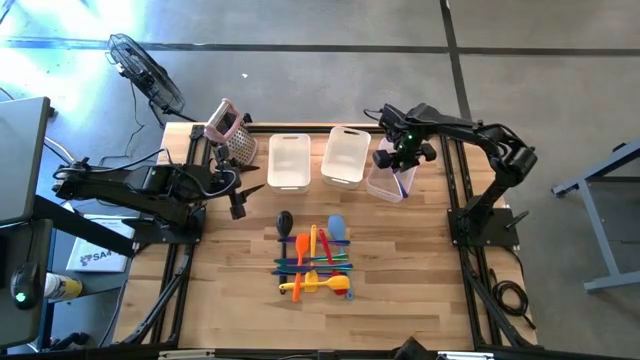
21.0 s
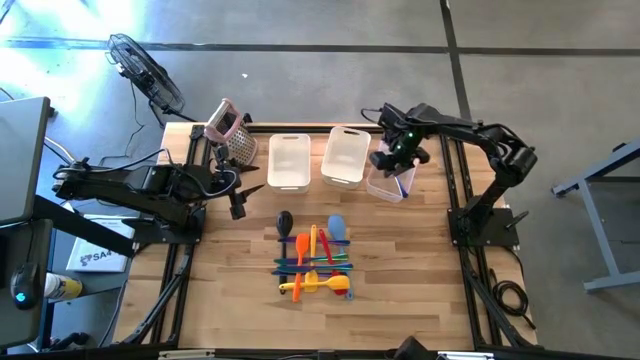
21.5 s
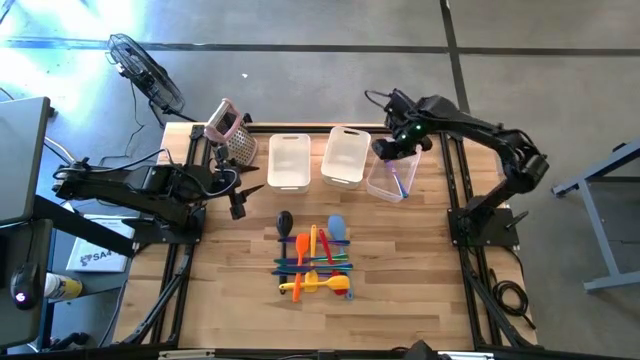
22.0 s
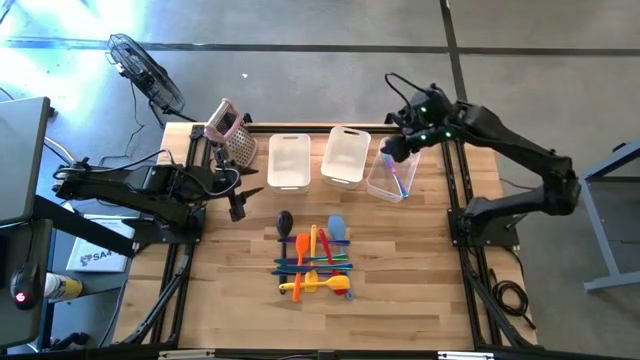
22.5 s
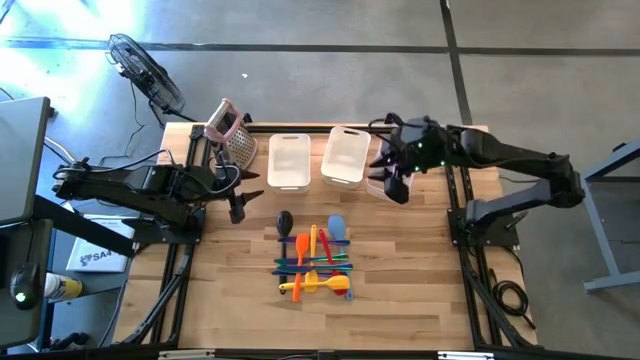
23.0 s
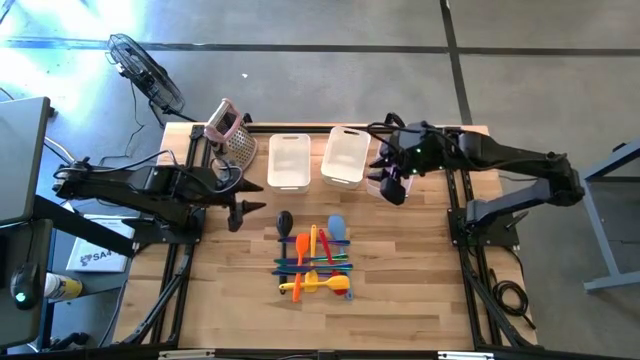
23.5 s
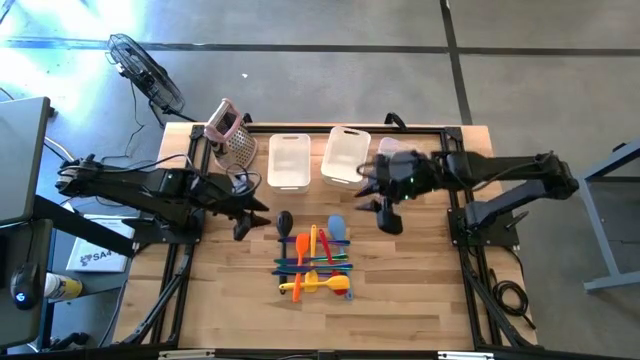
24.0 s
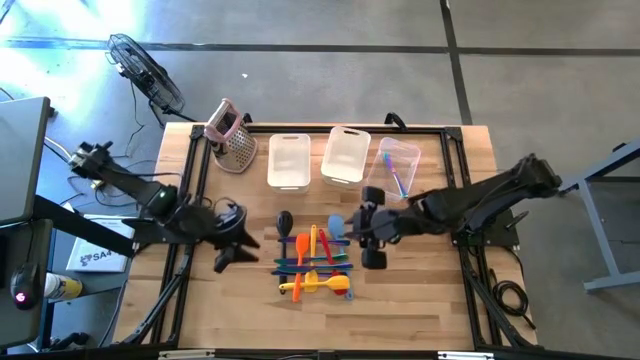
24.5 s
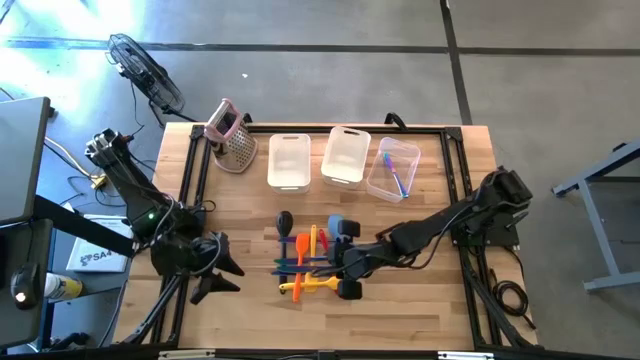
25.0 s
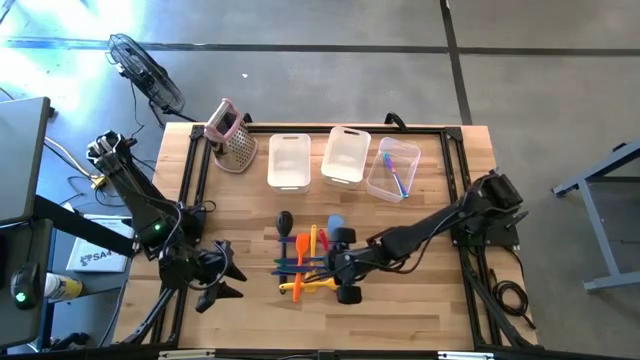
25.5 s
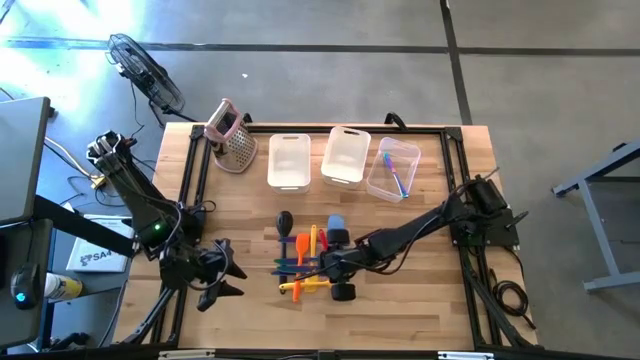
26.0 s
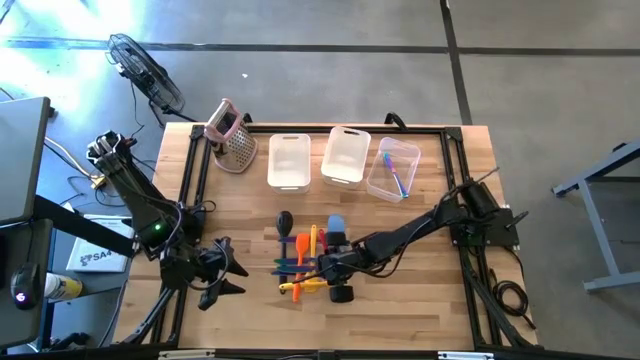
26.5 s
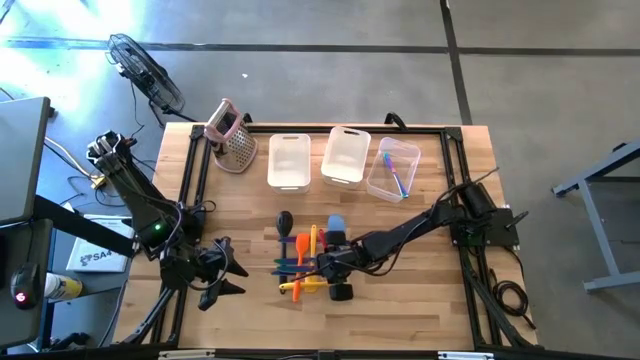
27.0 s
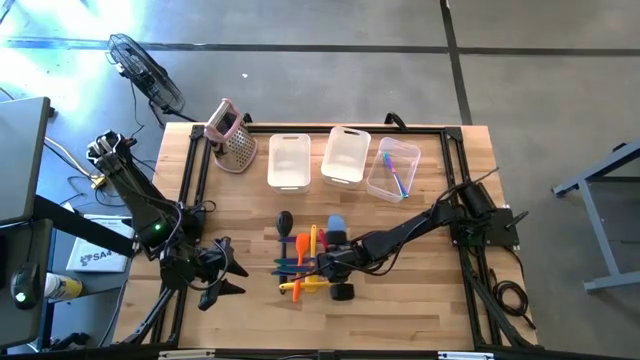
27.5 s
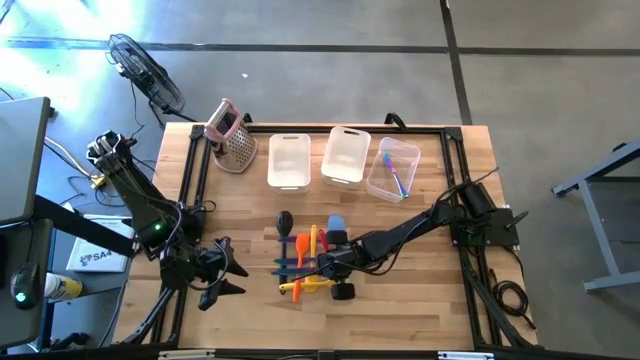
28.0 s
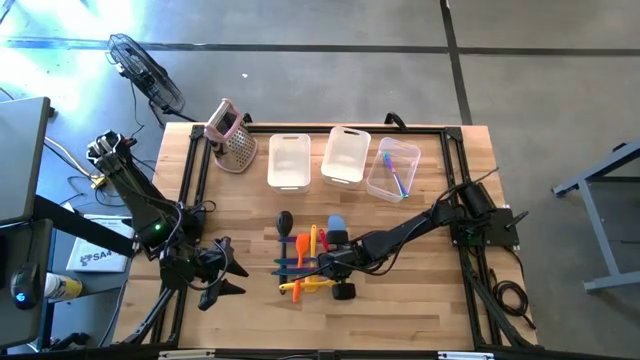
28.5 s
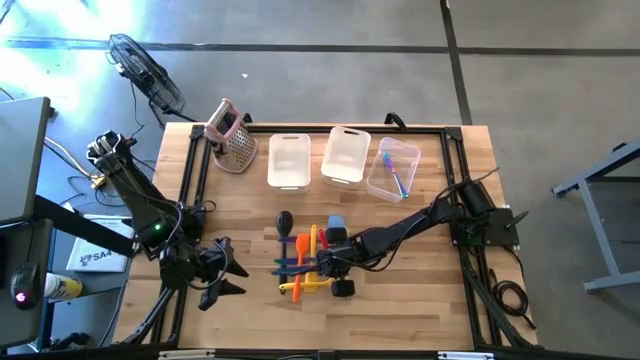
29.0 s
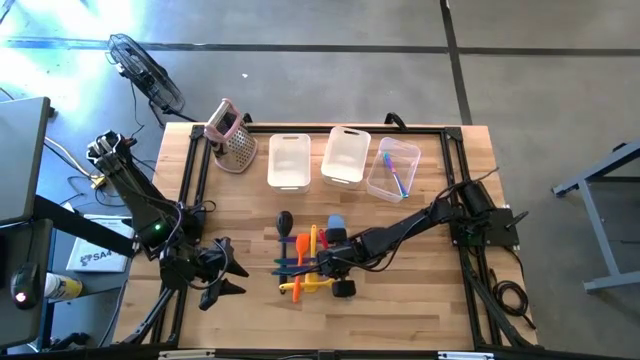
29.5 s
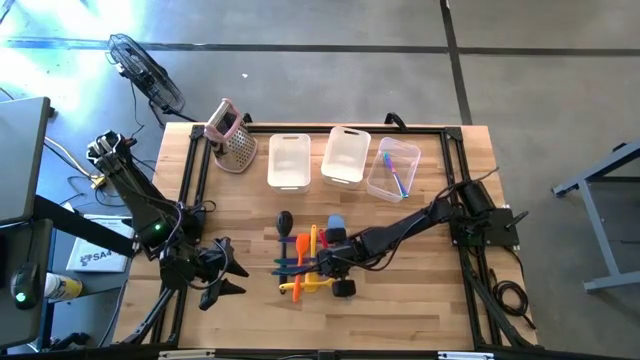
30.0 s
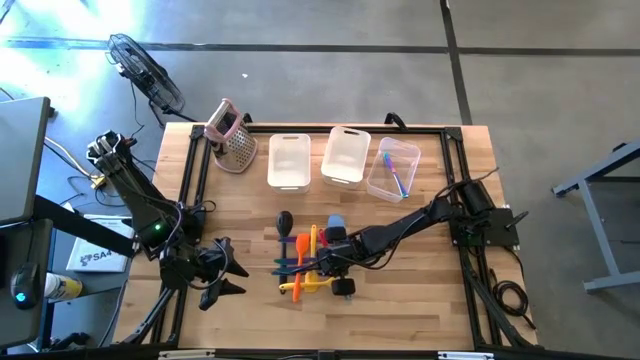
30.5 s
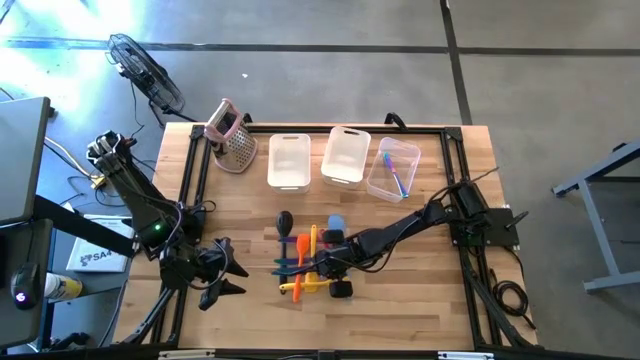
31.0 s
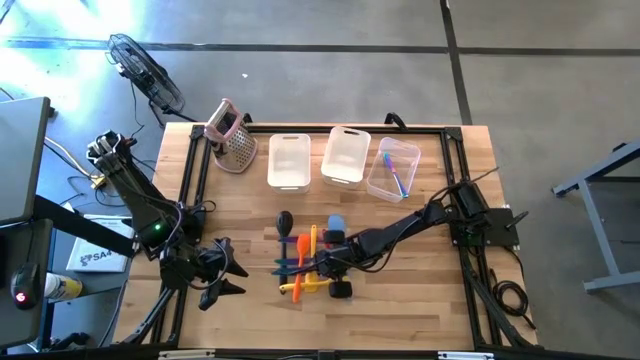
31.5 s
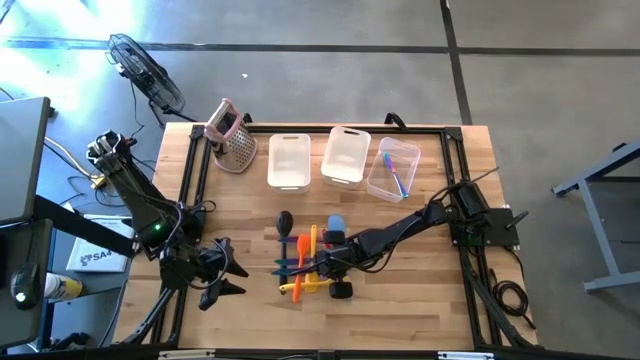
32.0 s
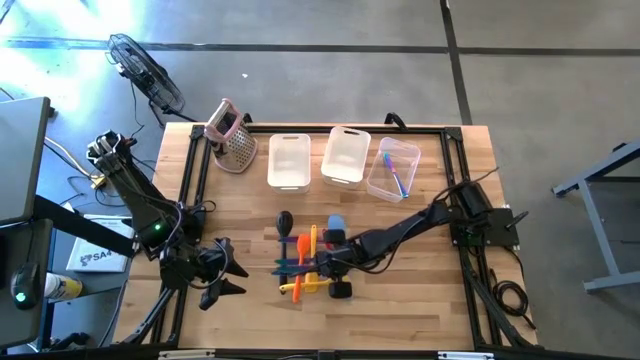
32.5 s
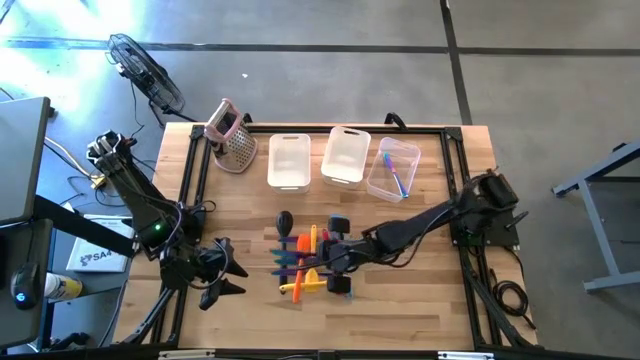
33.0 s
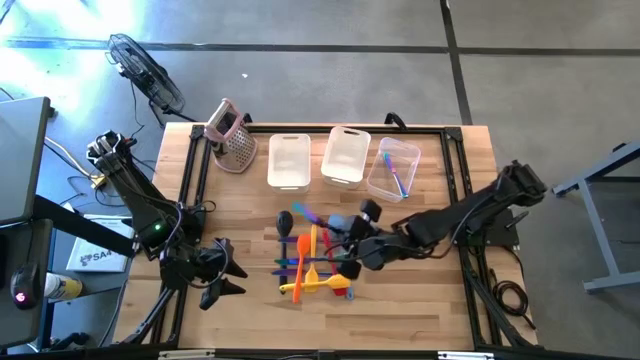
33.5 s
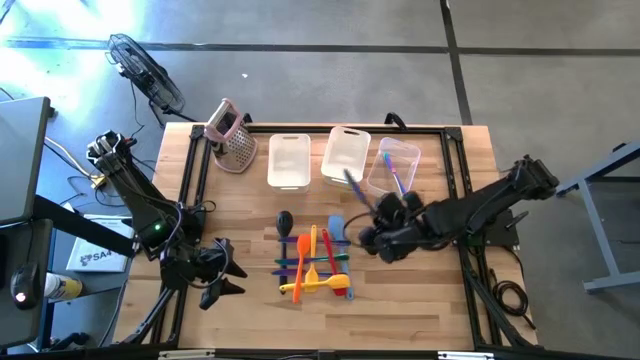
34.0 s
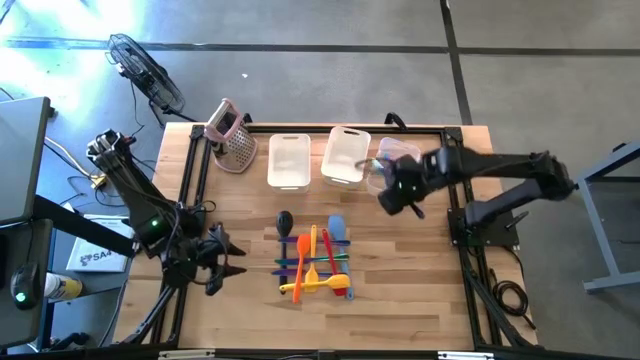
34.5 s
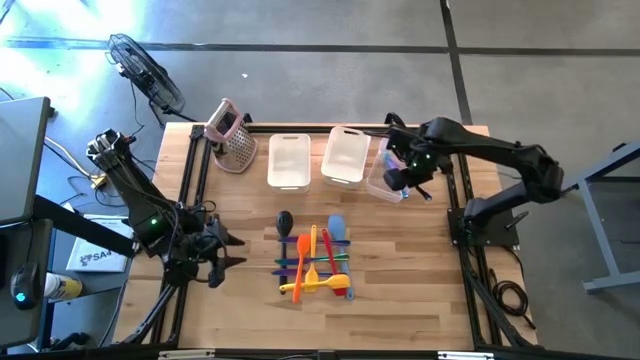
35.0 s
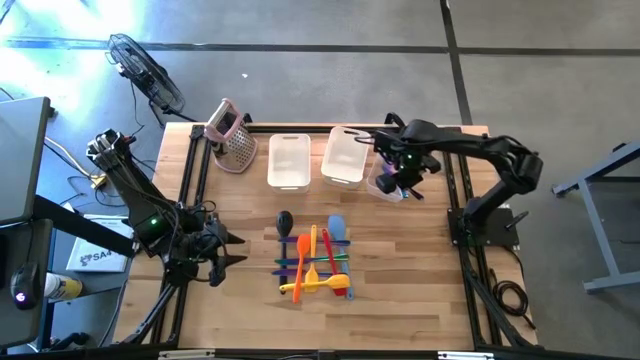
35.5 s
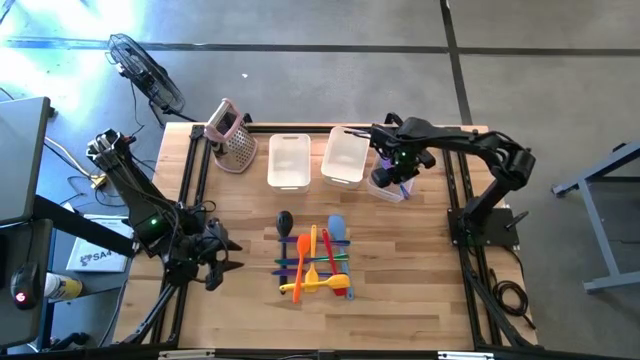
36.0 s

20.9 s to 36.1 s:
Task: Pick & Place Kitchen Items
Put the blue table knife into the transparent bin
